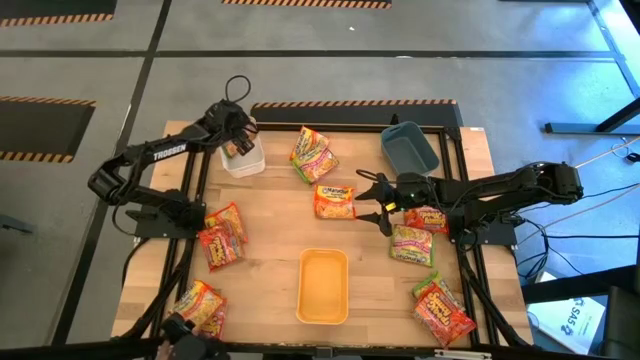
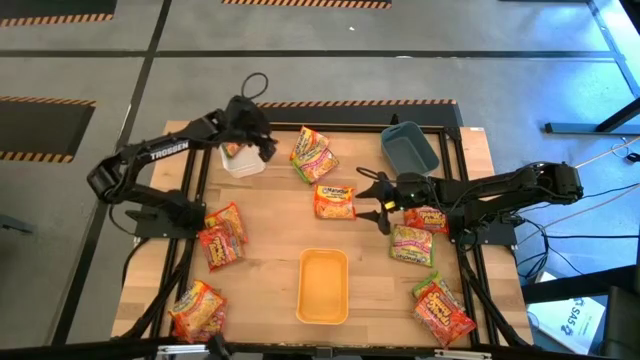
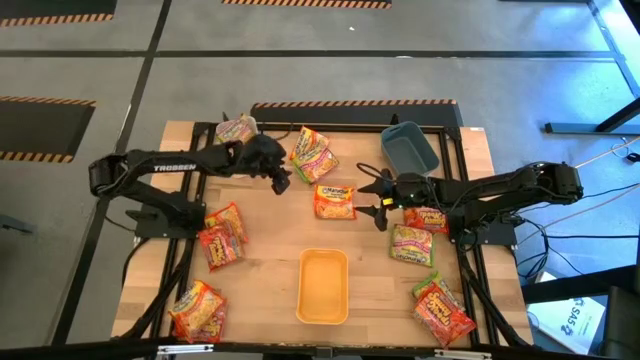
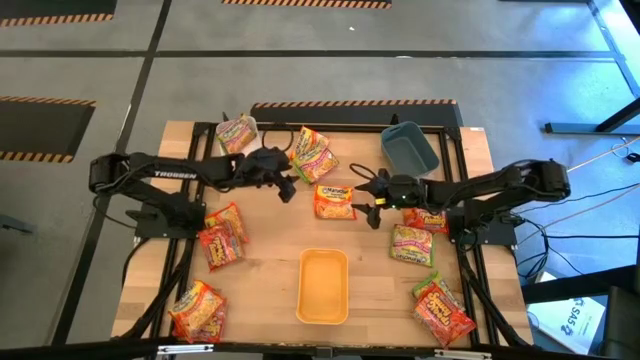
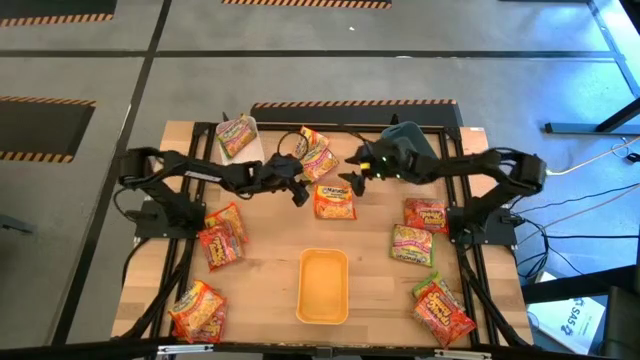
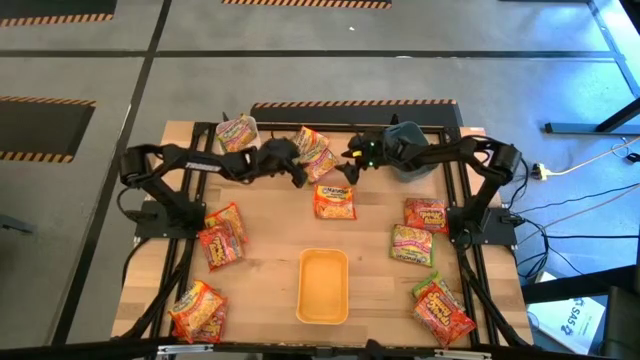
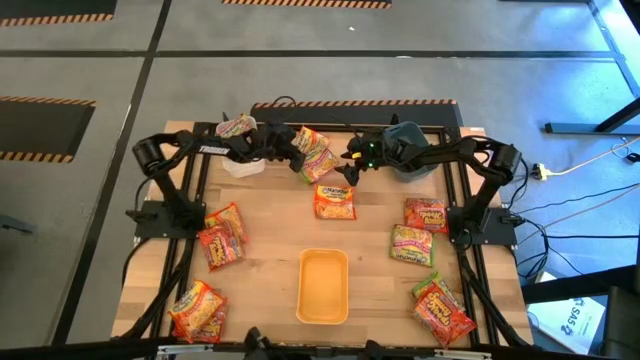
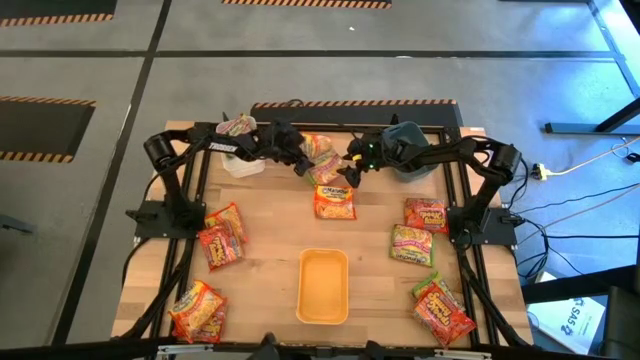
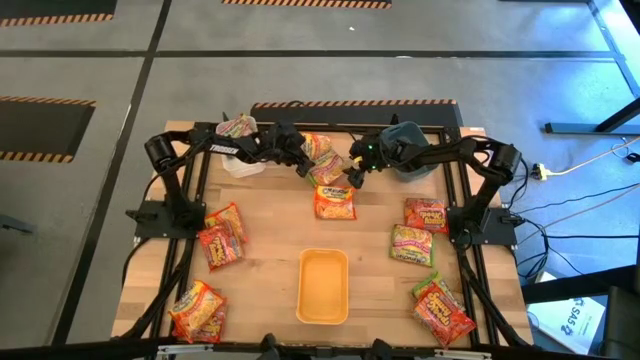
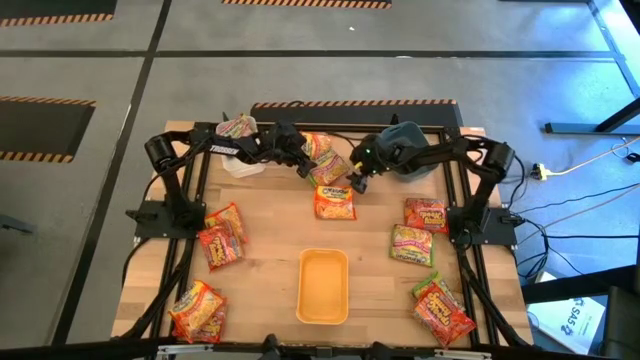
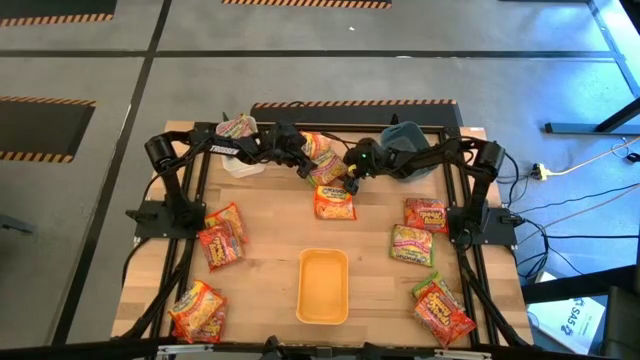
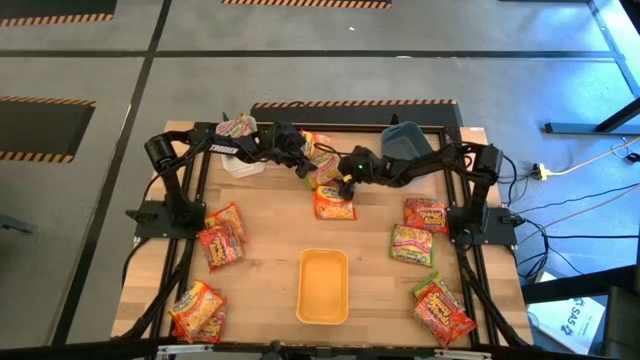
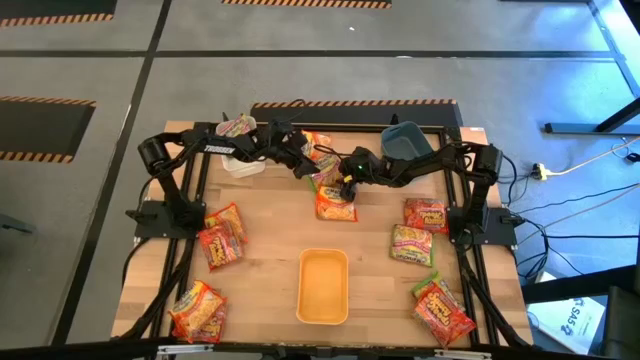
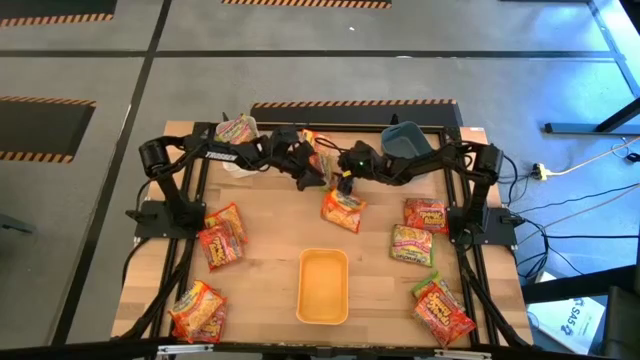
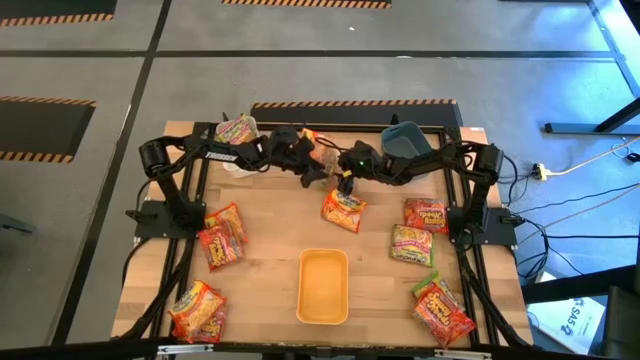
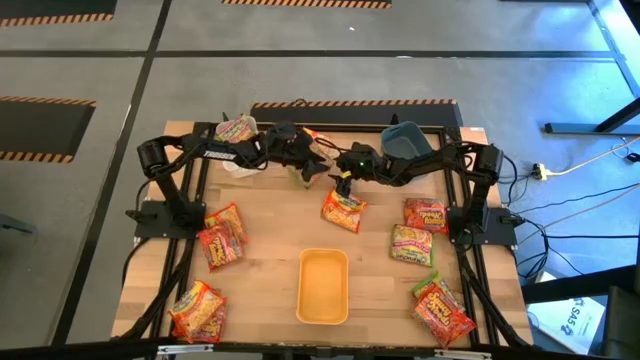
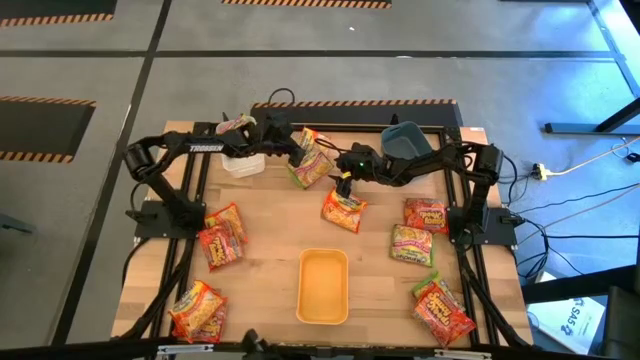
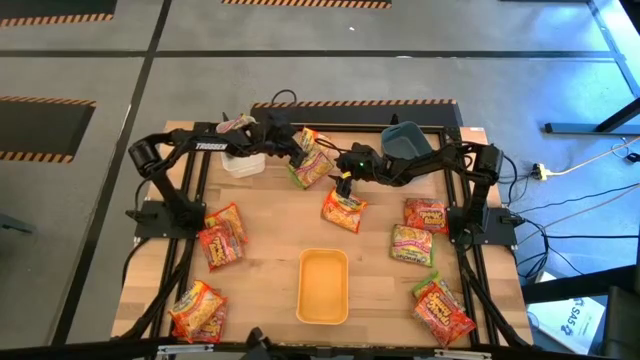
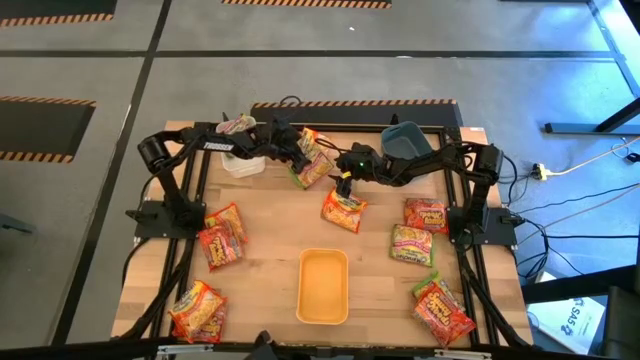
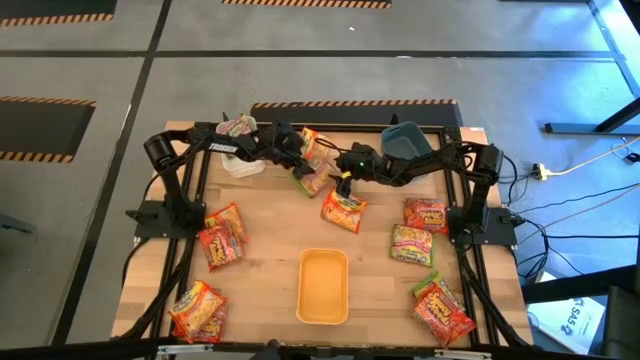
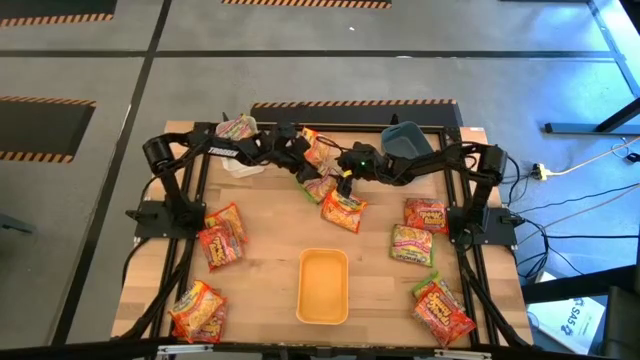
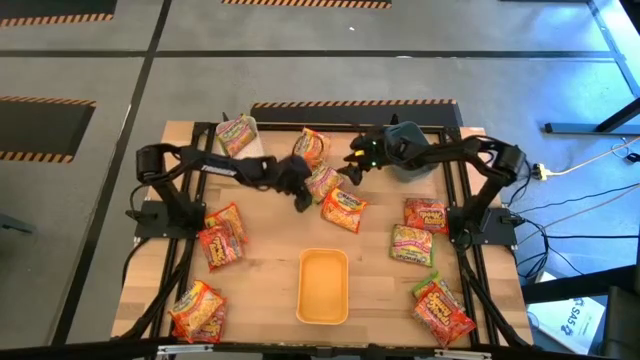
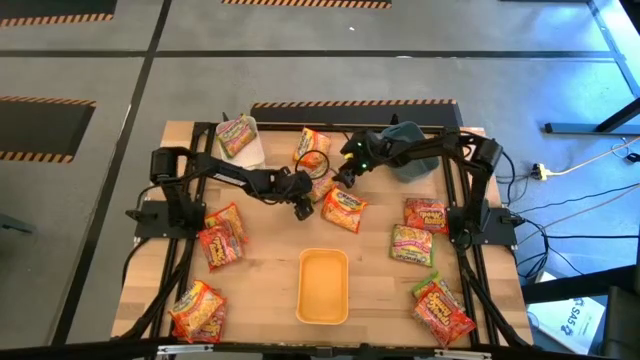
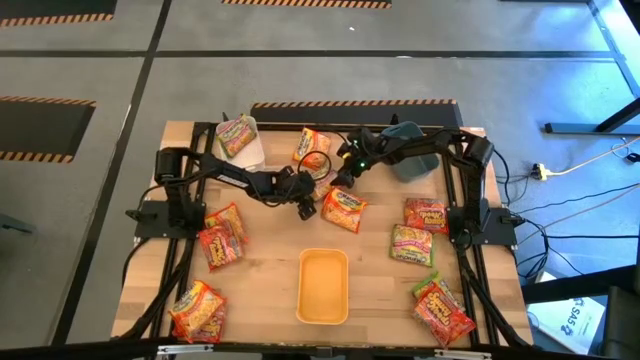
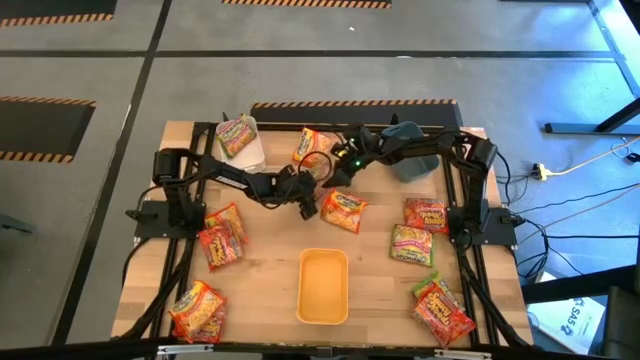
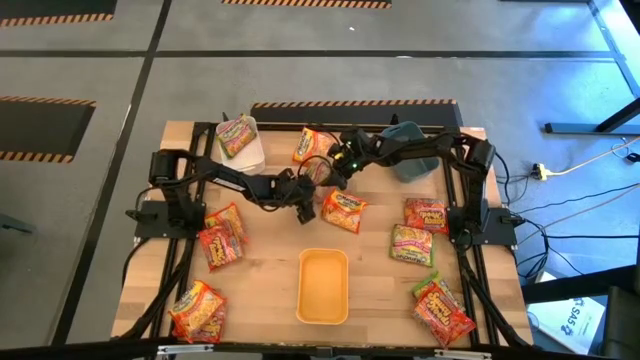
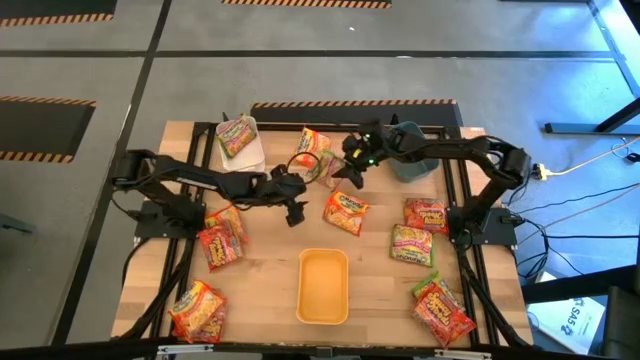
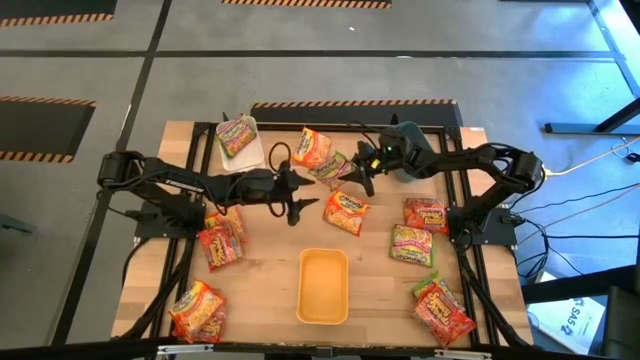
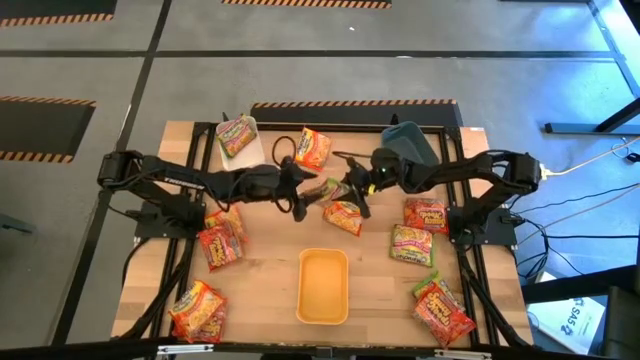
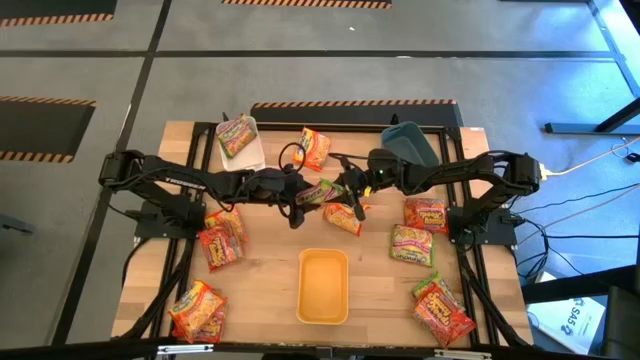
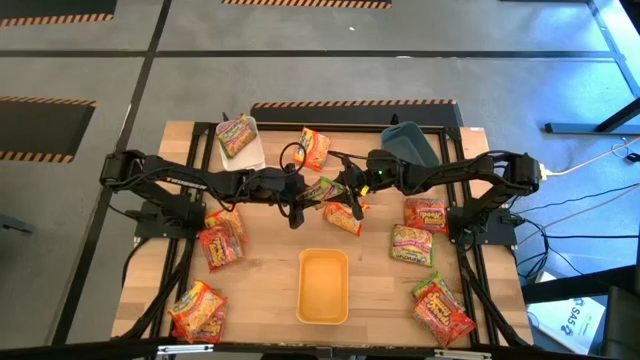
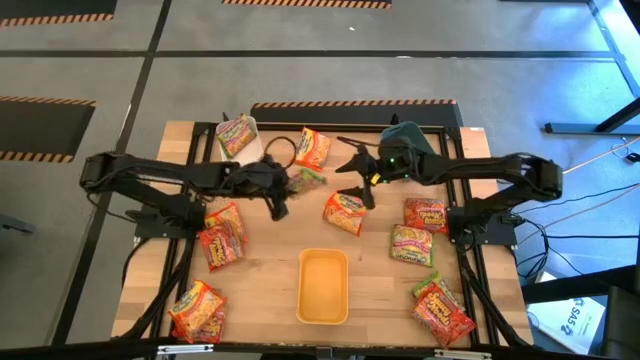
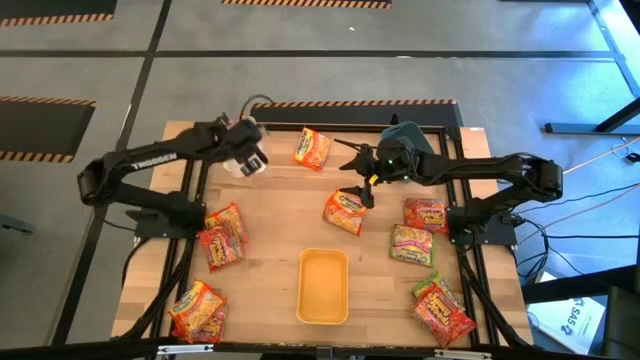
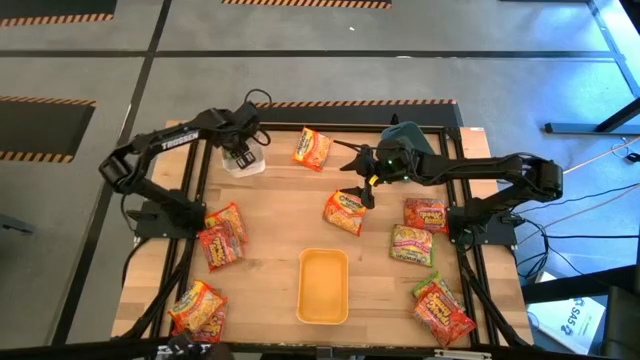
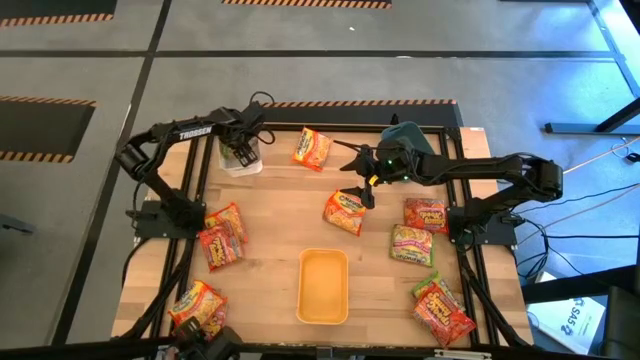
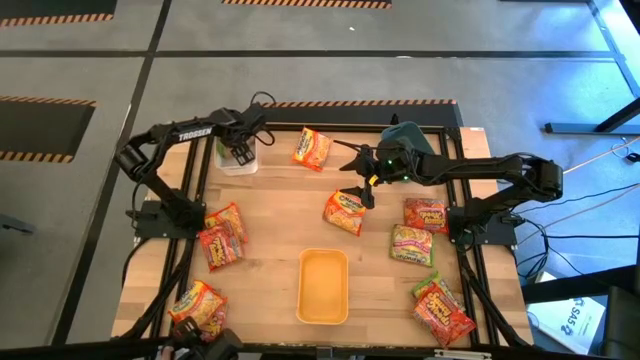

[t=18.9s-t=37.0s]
Task: Sort Maruchan noodles
Put the top left green noodle pack into the white bin

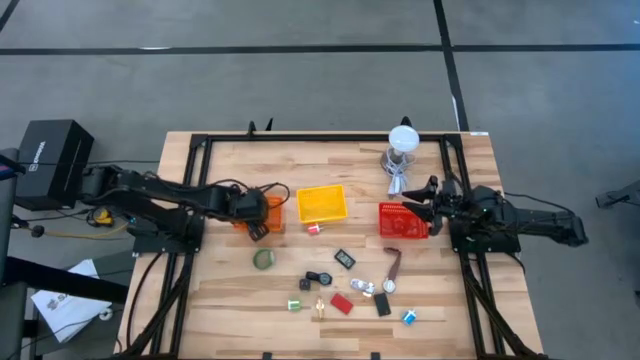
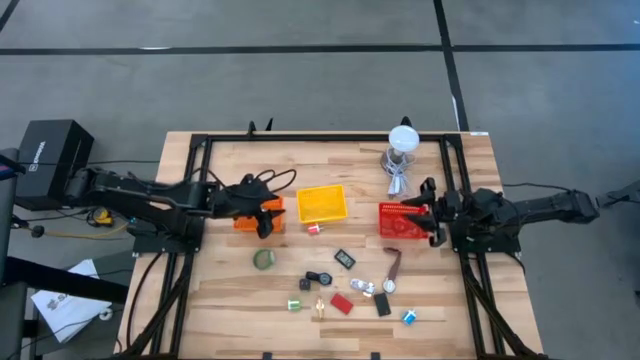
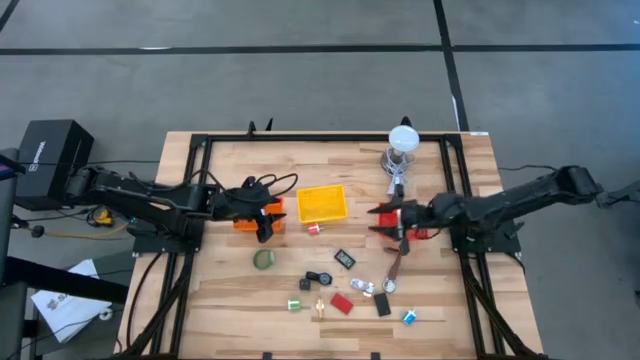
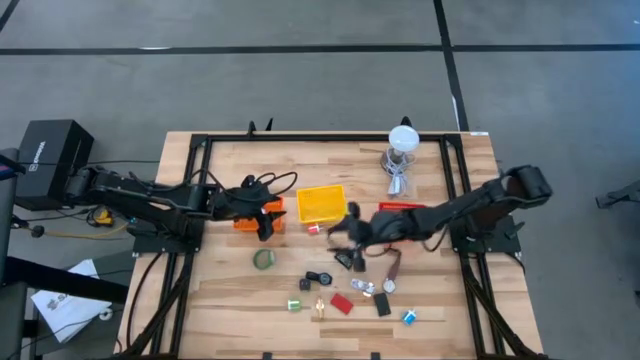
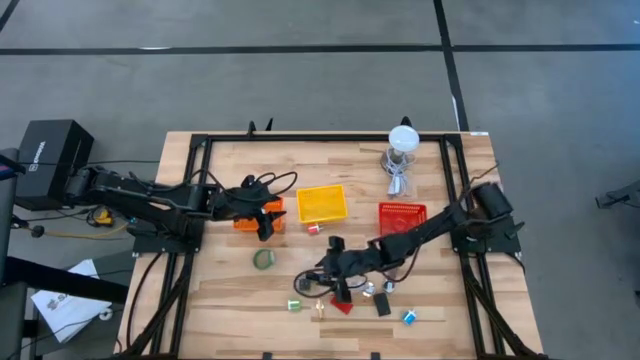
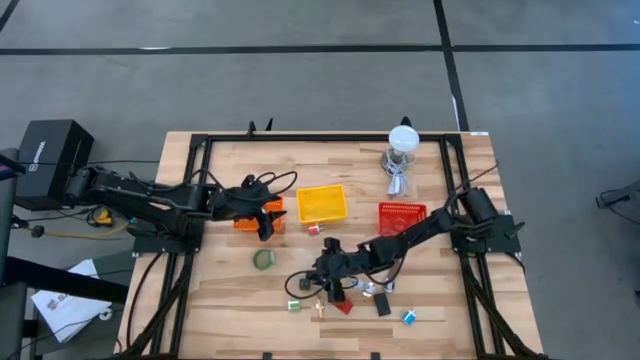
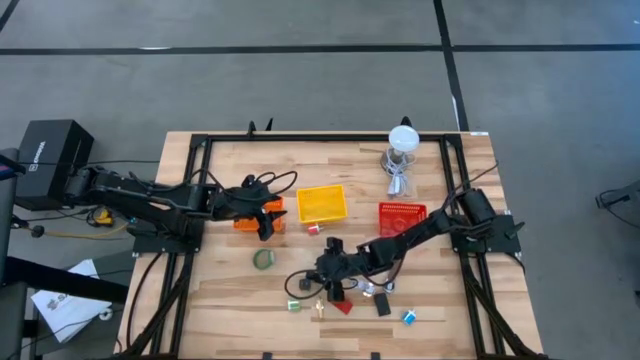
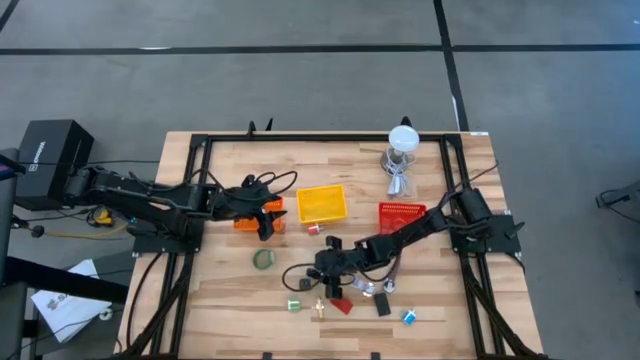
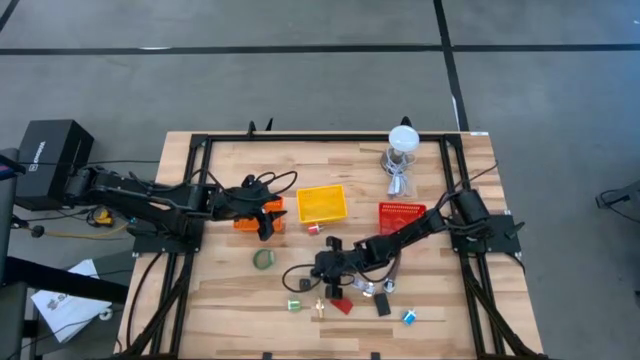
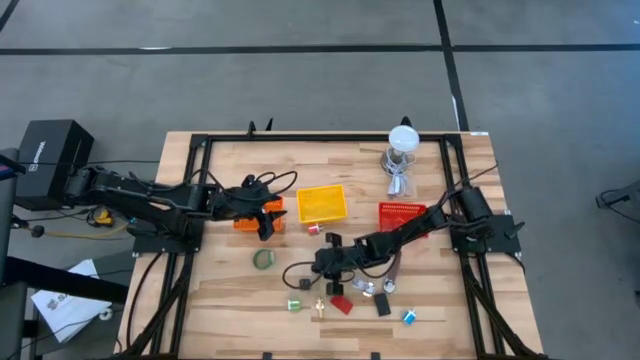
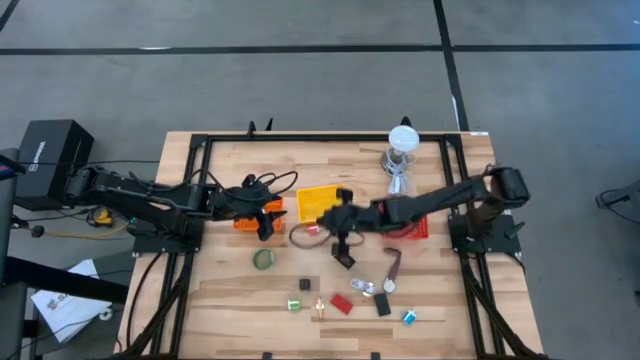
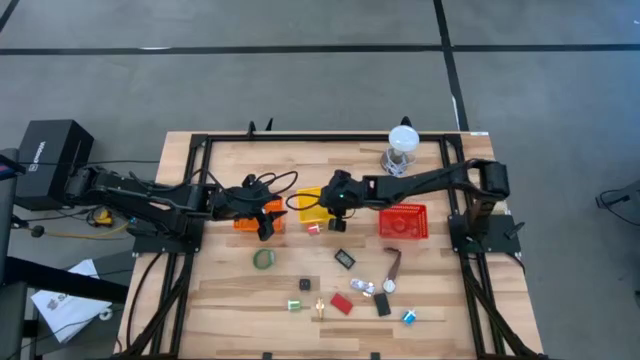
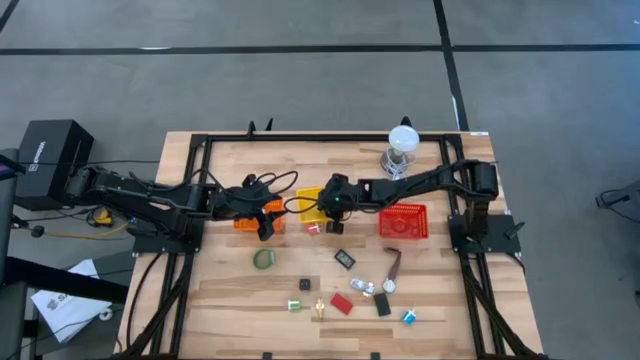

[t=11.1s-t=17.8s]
Task: Pick & Place Office items
Put the top black wristwatch into the yellow bin
